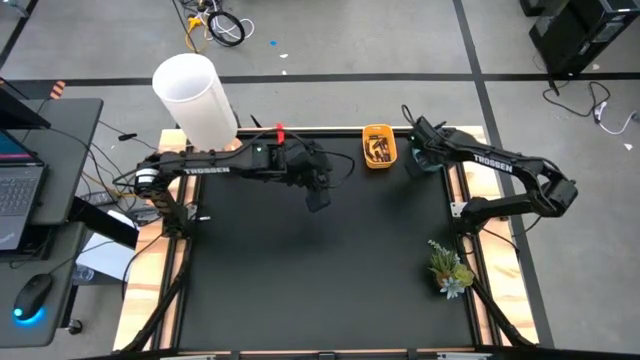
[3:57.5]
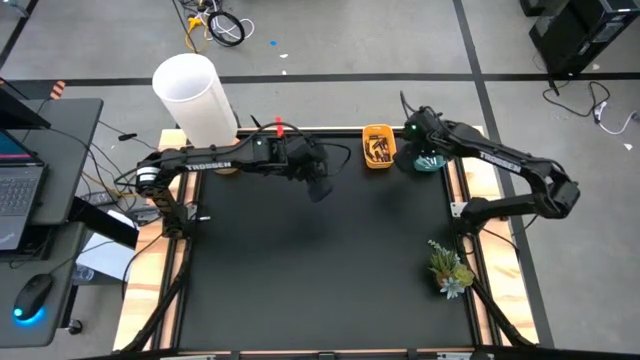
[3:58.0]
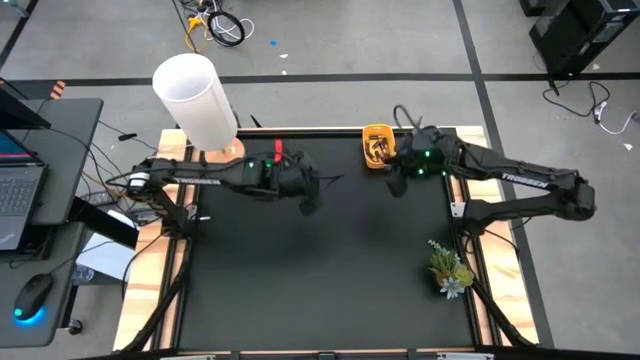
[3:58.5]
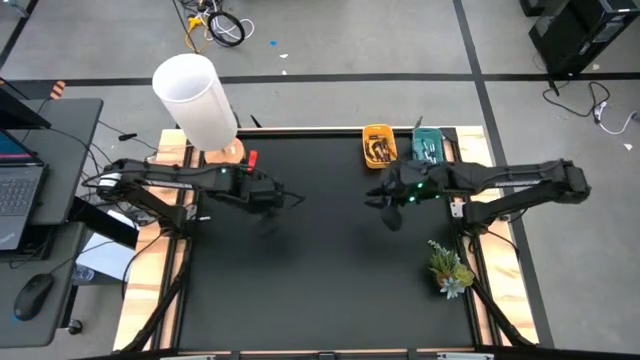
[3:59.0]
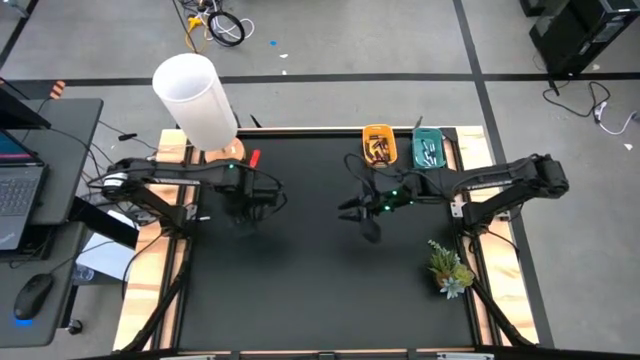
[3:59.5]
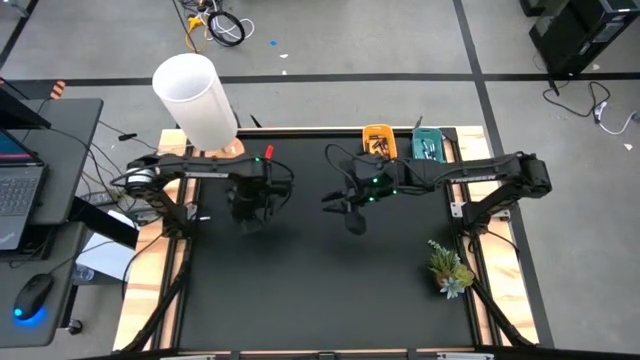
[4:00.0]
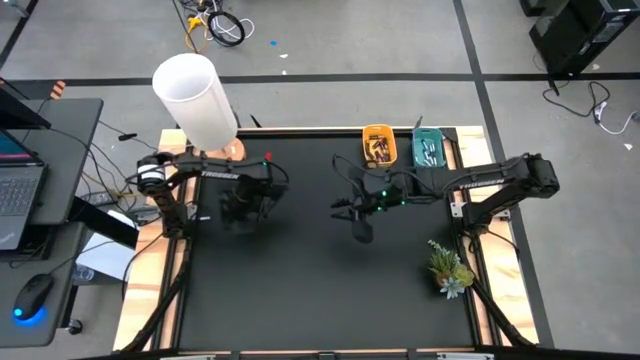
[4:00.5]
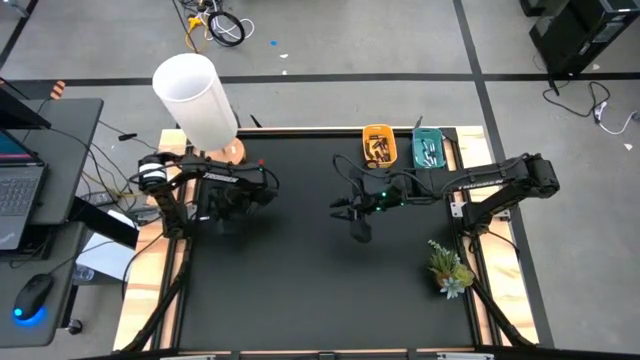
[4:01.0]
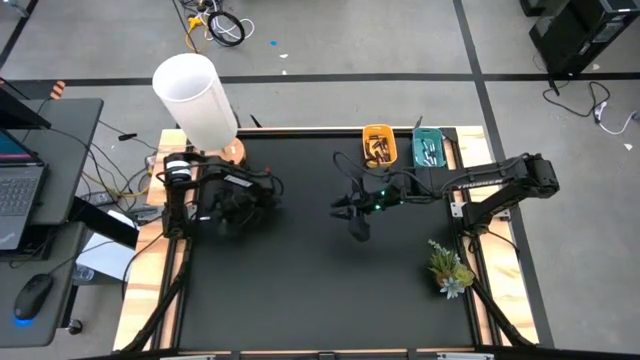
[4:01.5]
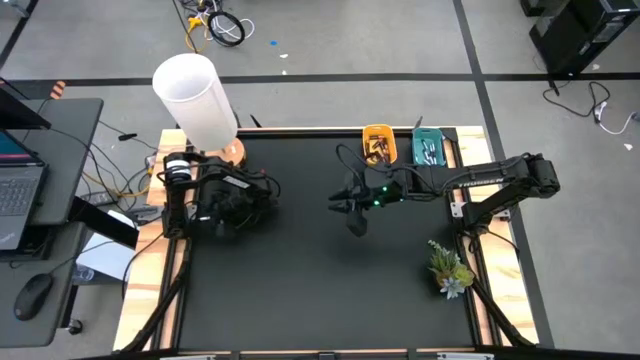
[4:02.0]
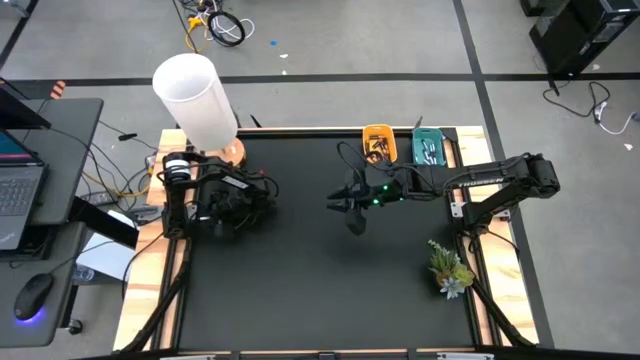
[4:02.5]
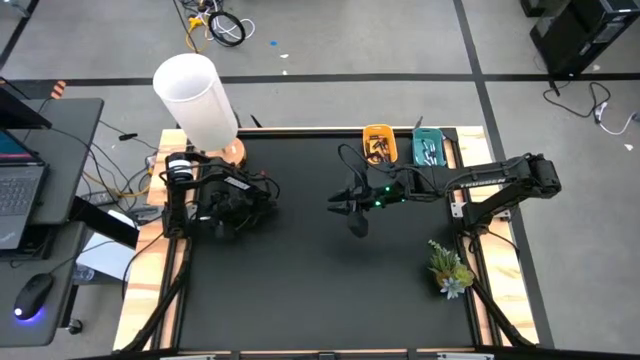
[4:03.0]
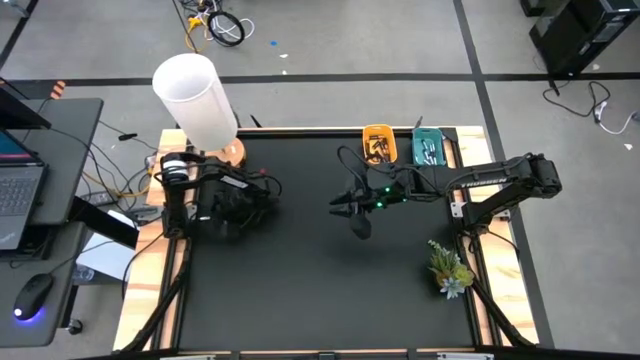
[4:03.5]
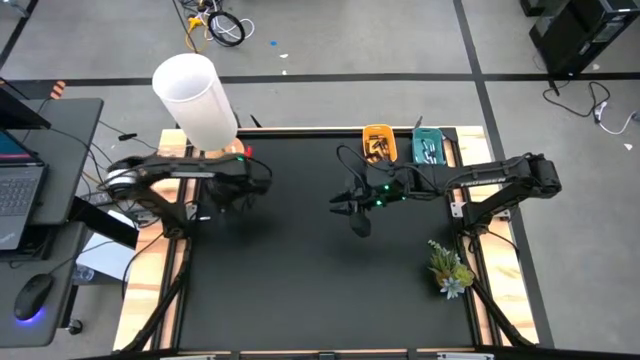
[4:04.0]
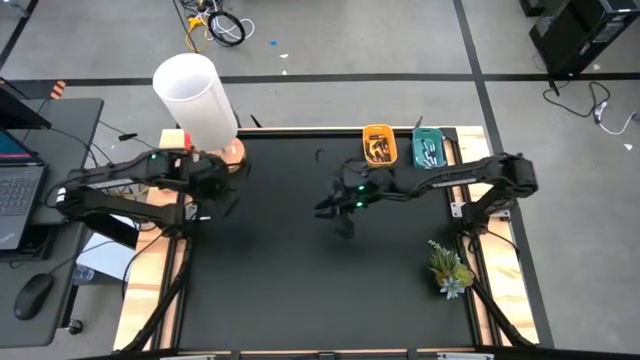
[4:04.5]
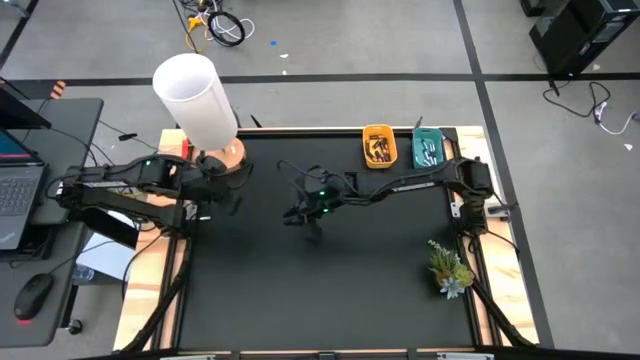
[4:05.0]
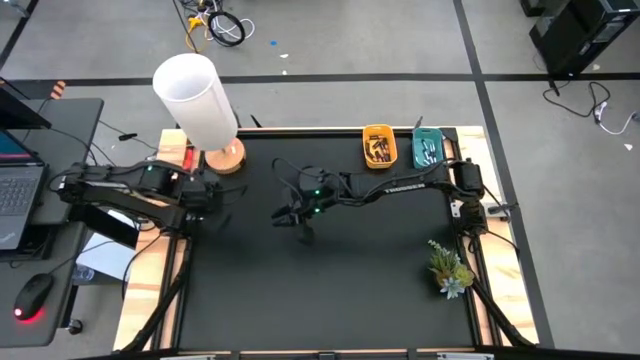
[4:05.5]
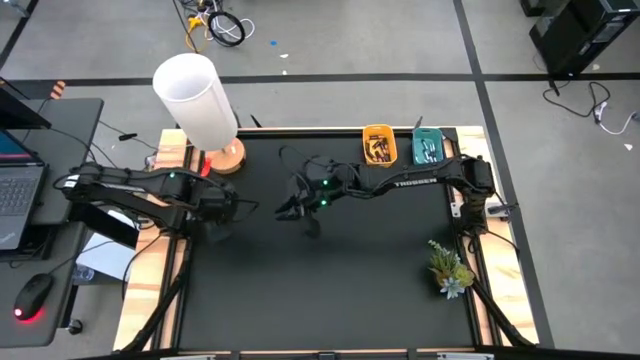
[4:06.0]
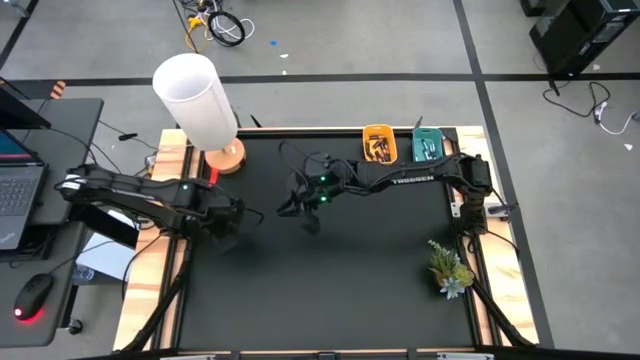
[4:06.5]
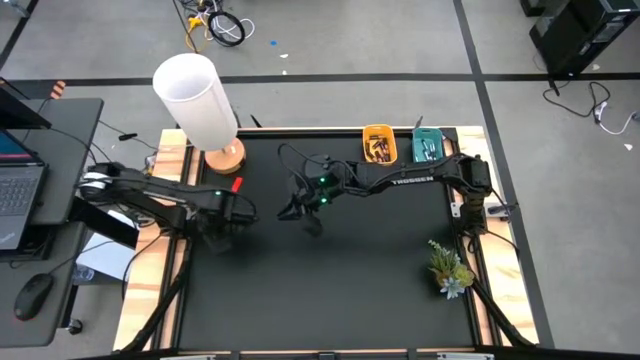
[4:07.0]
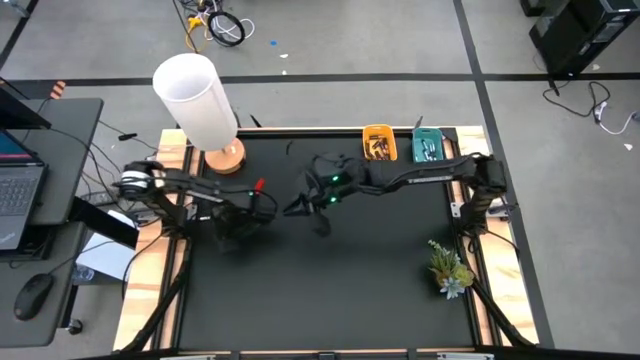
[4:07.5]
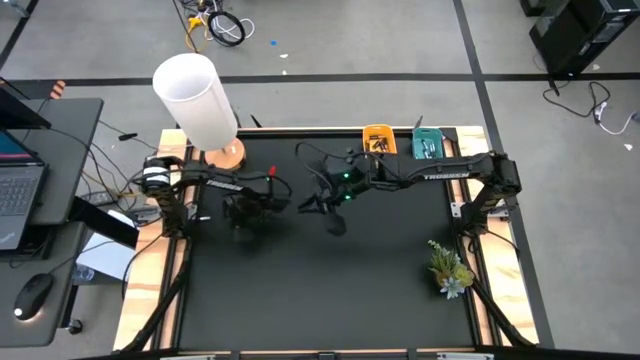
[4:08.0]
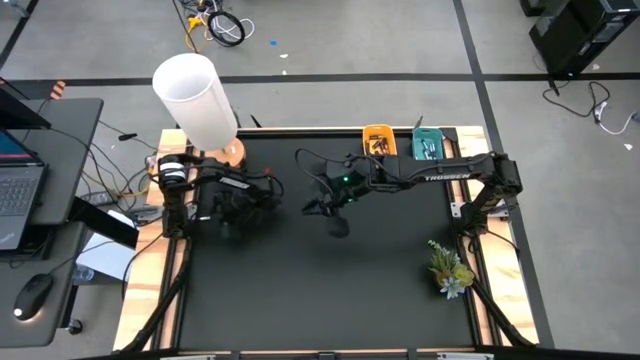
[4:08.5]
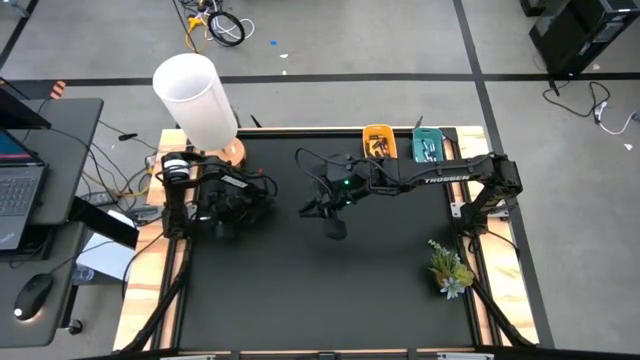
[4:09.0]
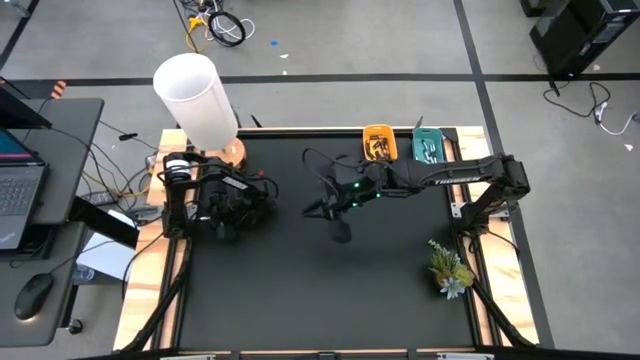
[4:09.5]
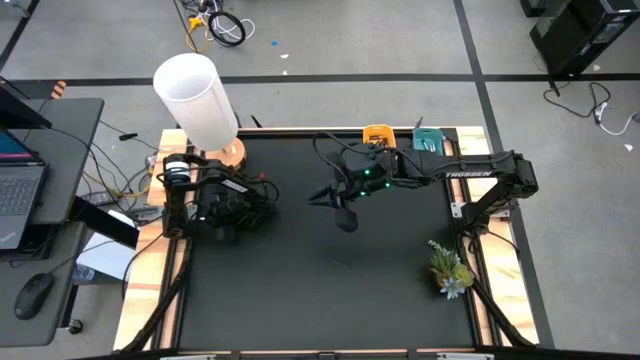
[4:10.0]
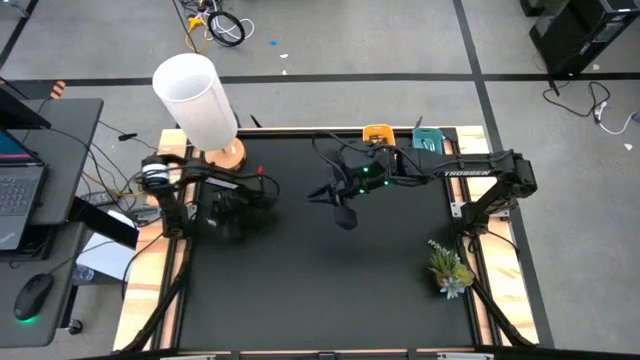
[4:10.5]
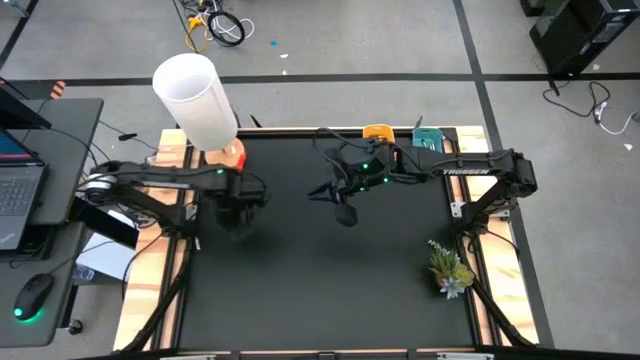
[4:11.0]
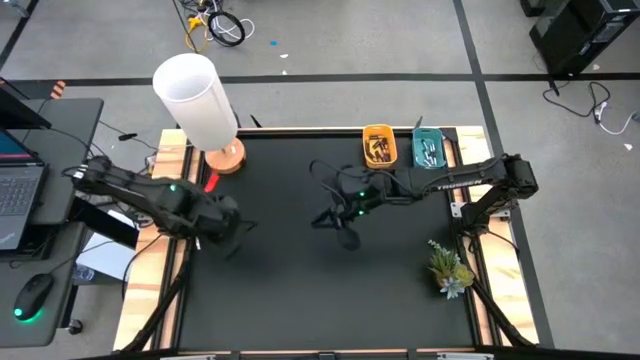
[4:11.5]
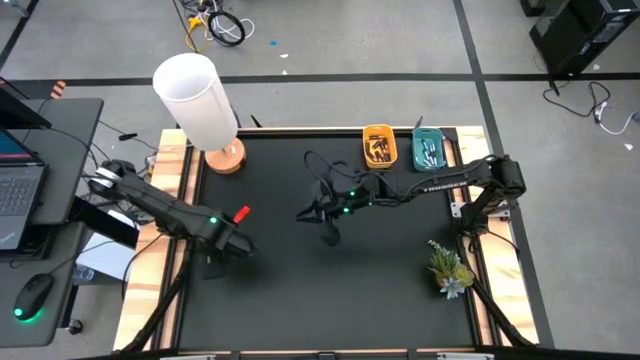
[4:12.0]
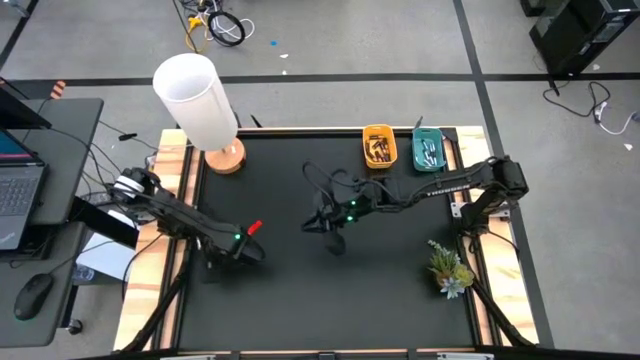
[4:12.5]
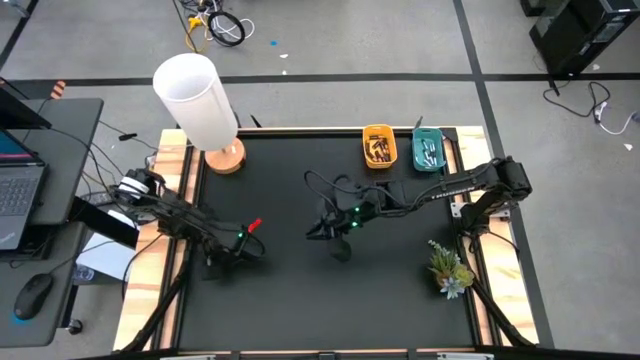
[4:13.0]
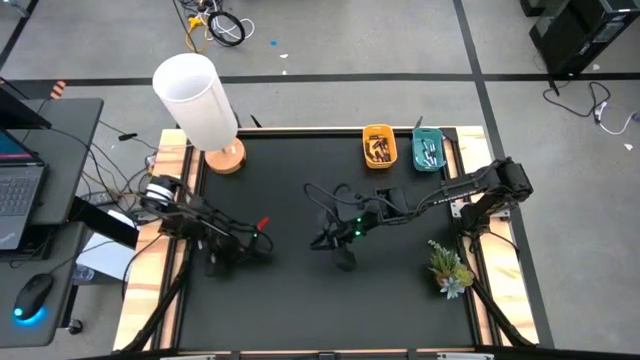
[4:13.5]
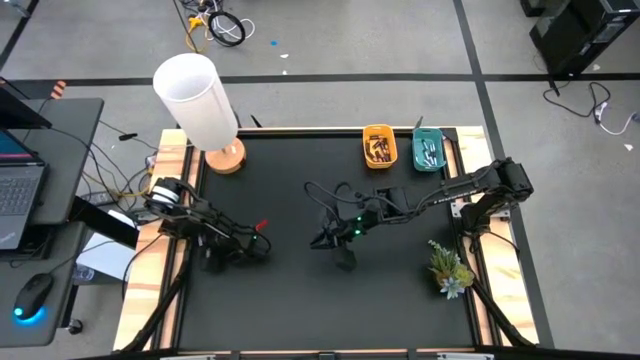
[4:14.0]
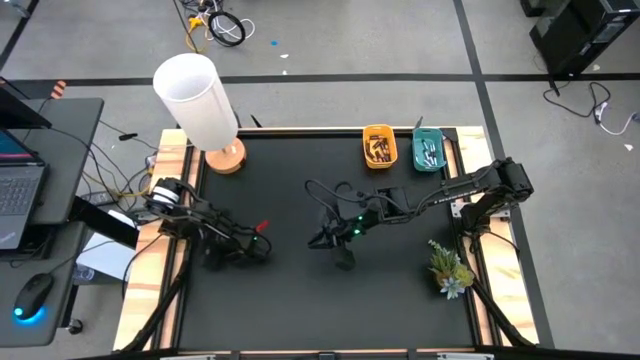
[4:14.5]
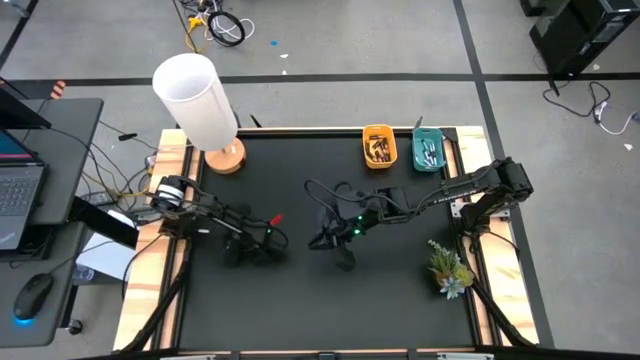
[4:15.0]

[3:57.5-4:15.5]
Task: Sort batteries
Put the silver battery into the blue bin

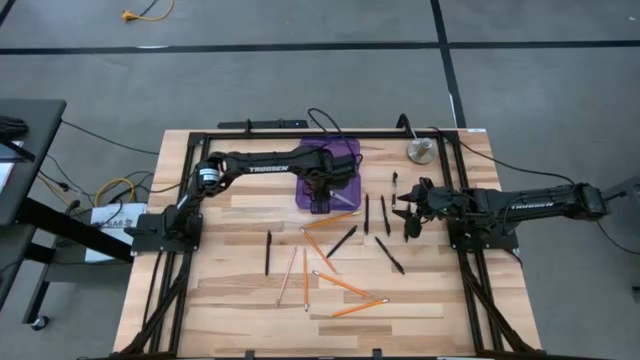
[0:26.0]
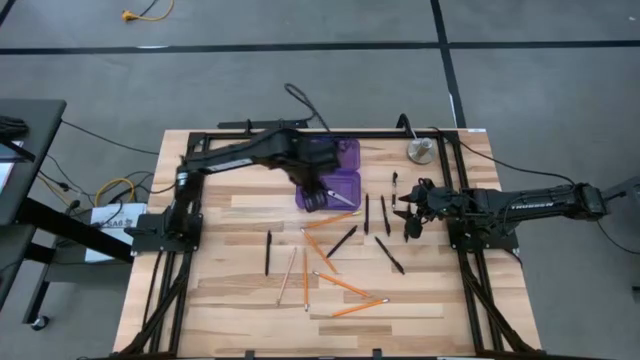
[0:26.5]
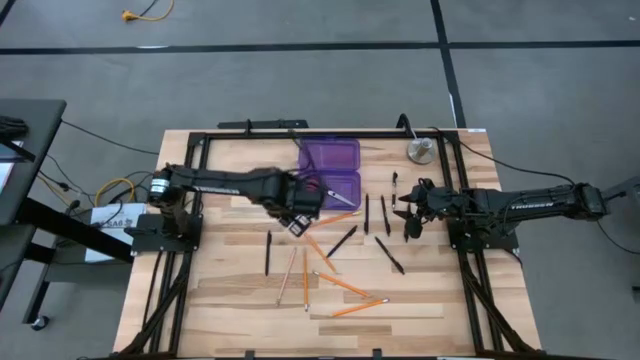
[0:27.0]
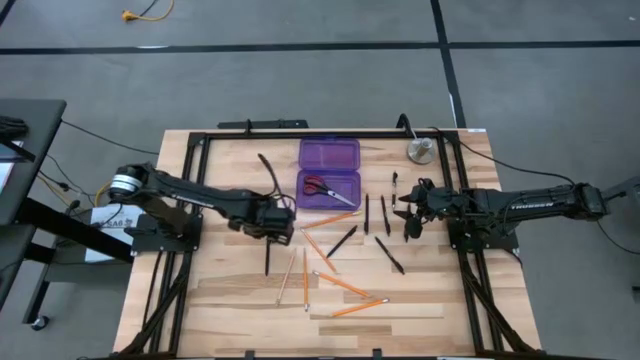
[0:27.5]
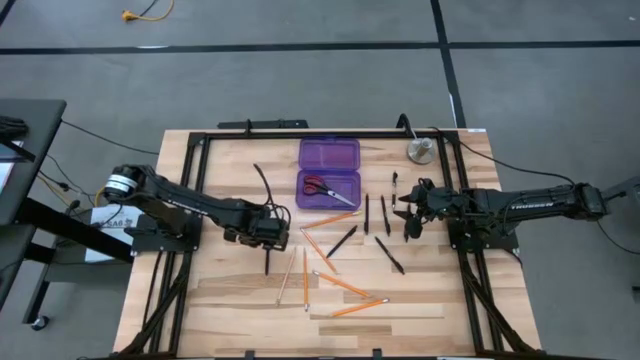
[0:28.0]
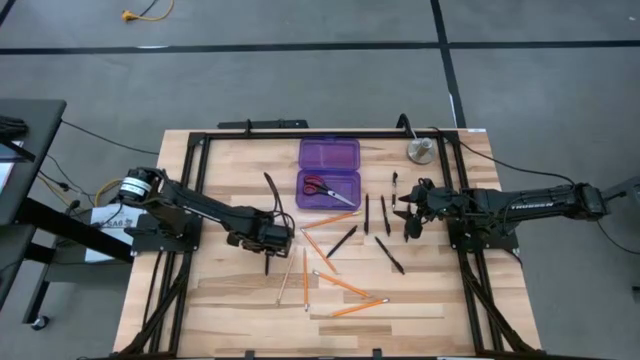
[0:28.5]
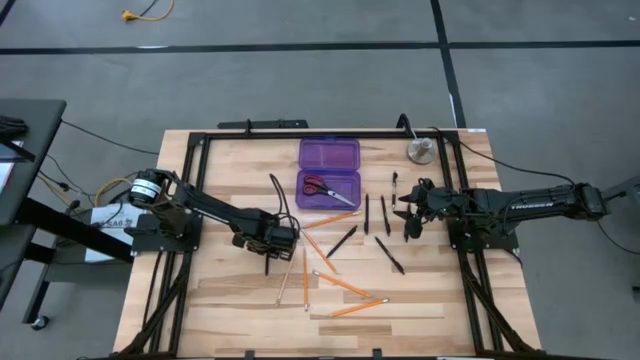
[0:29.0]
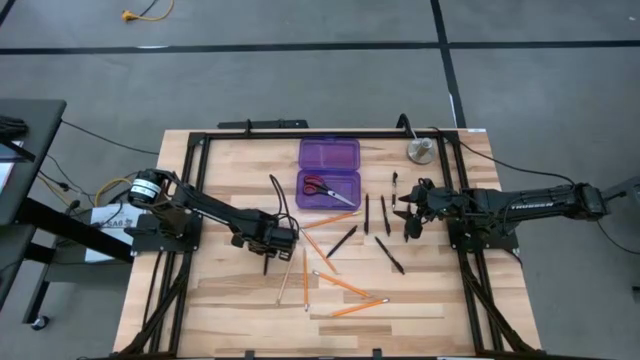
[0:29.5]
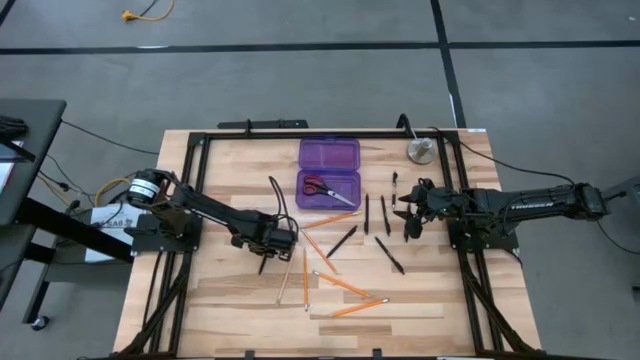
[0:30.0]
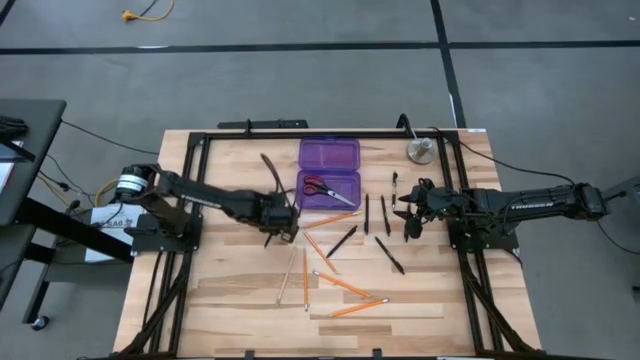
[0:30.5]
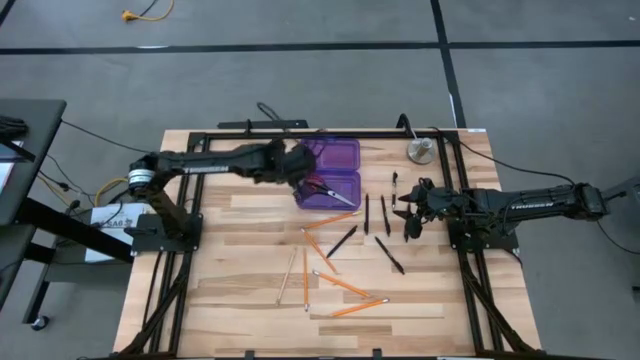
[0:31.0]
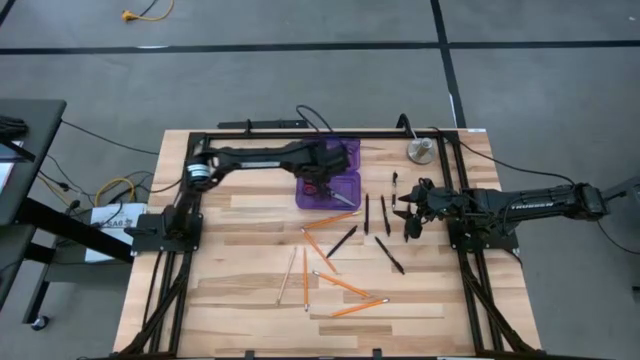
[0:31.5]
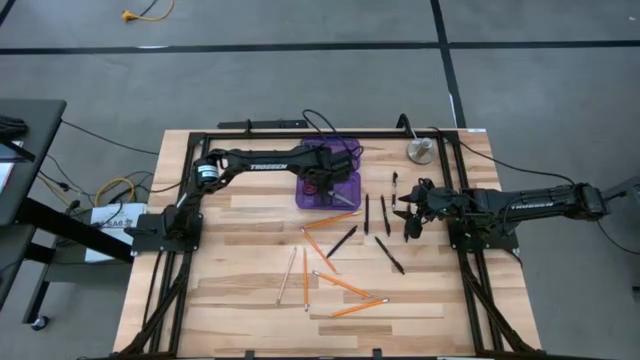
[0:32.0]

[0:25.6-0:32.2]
Task: Pick & place school supplies into a supply box
Put the black pen into the violet supply box
